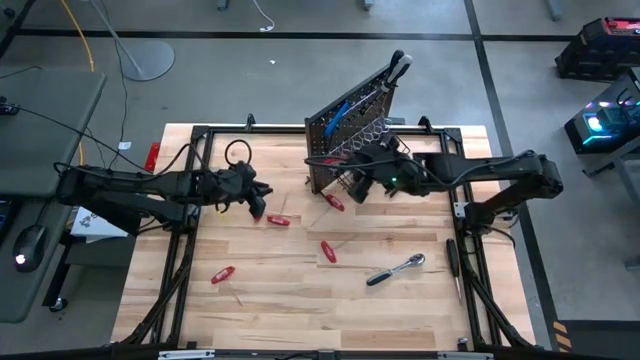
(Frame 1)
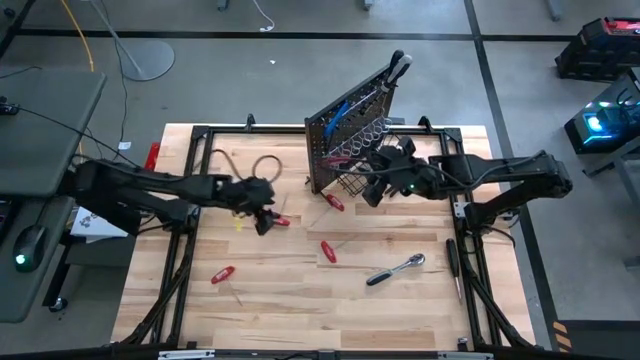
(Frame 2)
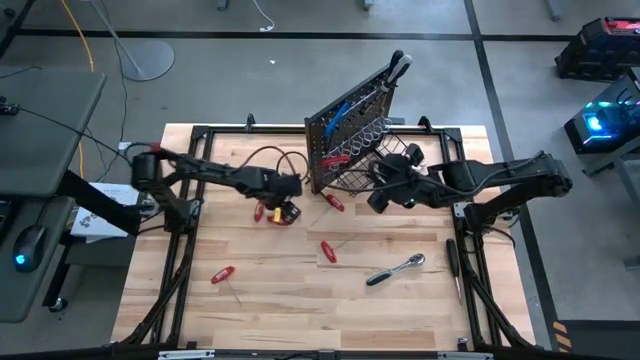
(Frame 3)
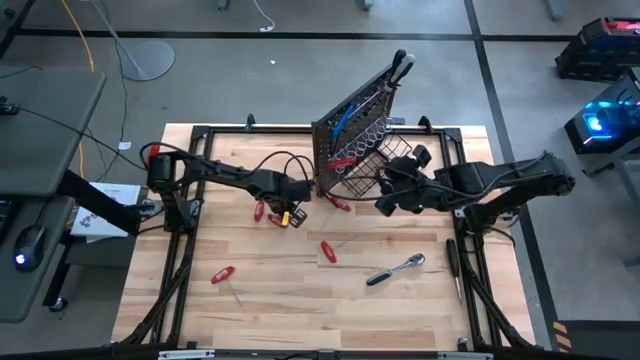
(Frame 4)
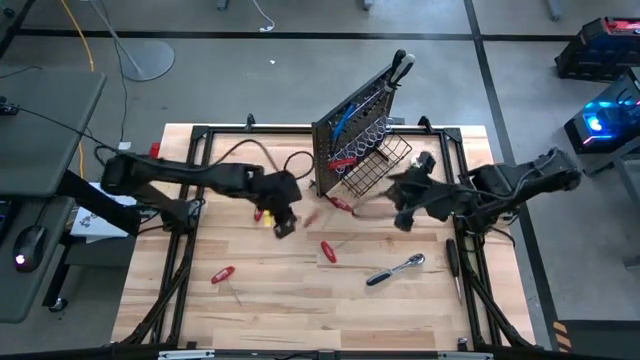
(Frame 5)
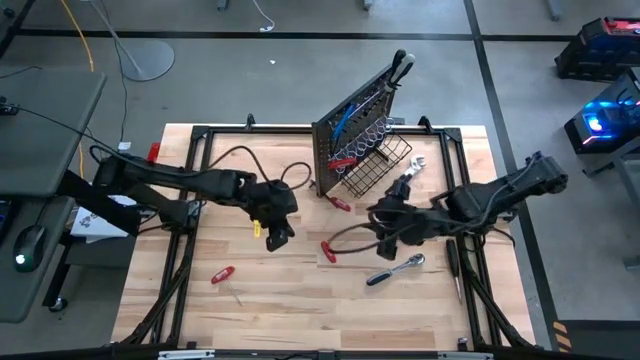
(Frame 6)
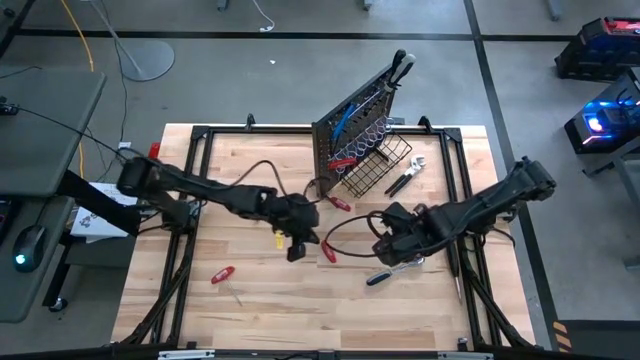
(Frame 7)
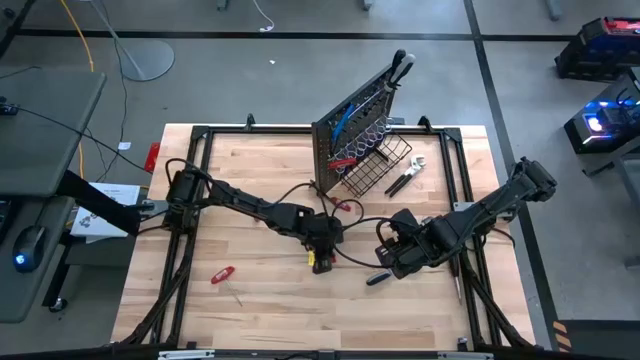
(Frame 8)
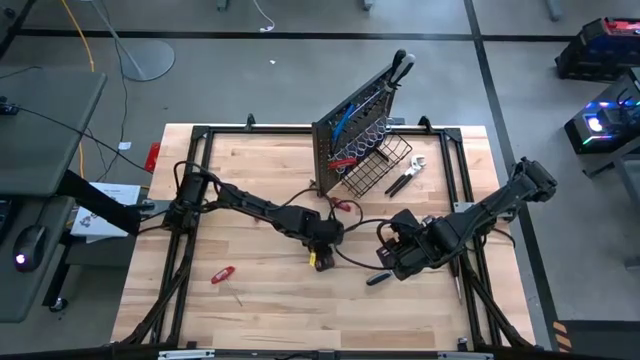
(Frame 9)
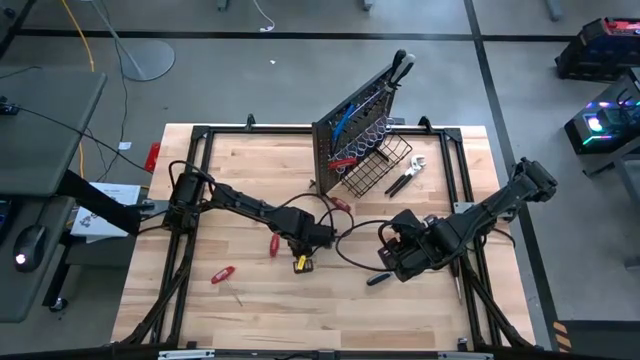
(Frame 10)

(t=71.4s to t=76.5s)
Task: Hang tools onto peg board
Hang the red allen wrench on the peg board

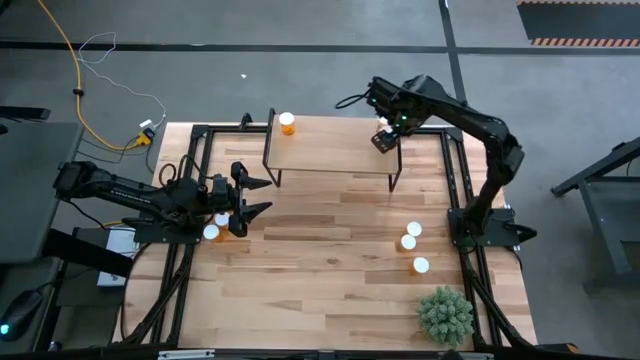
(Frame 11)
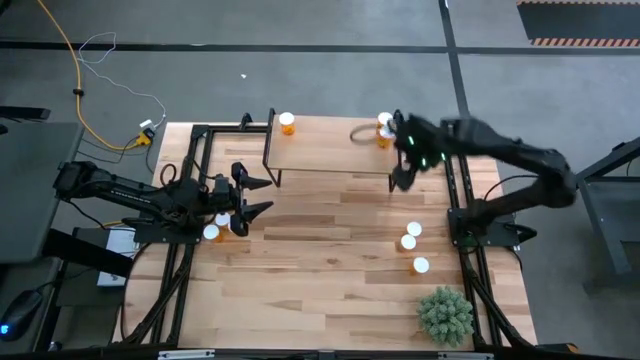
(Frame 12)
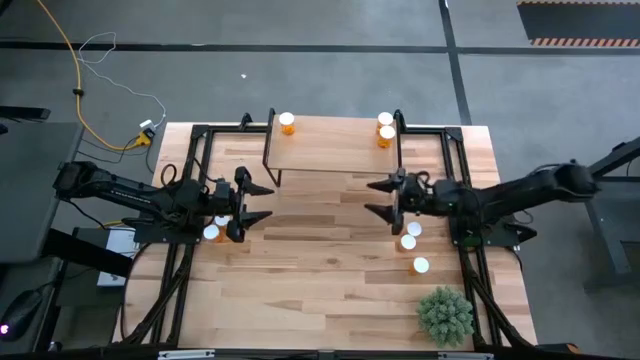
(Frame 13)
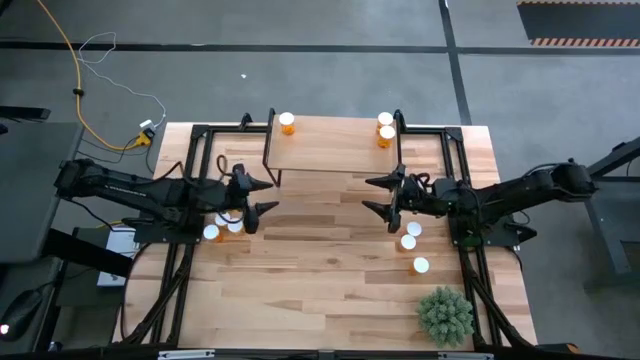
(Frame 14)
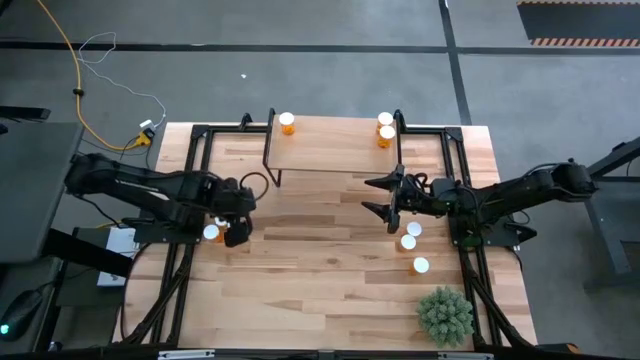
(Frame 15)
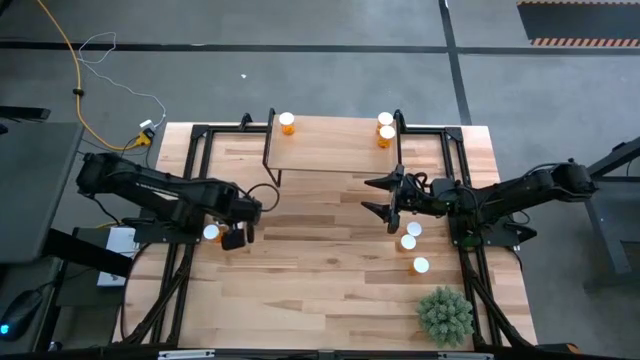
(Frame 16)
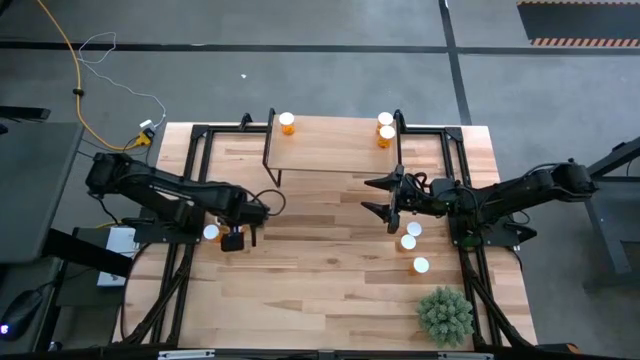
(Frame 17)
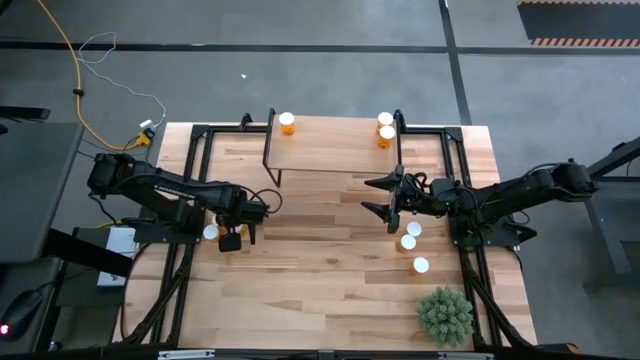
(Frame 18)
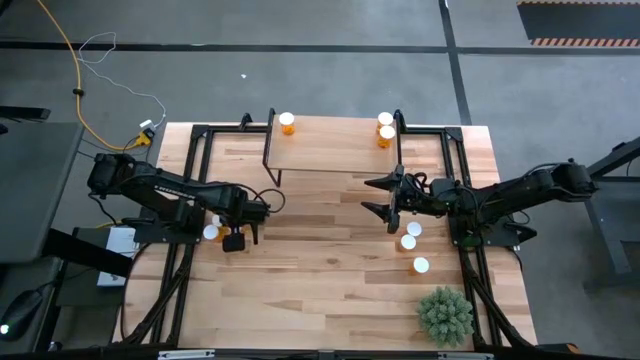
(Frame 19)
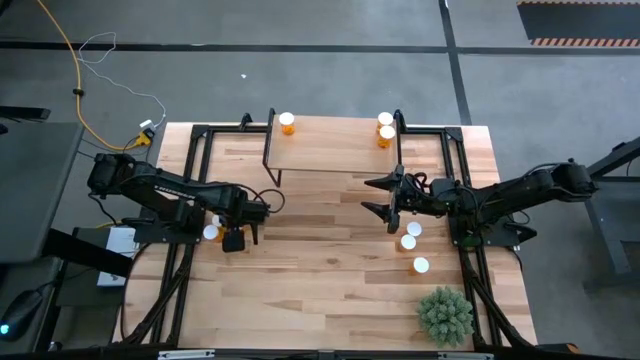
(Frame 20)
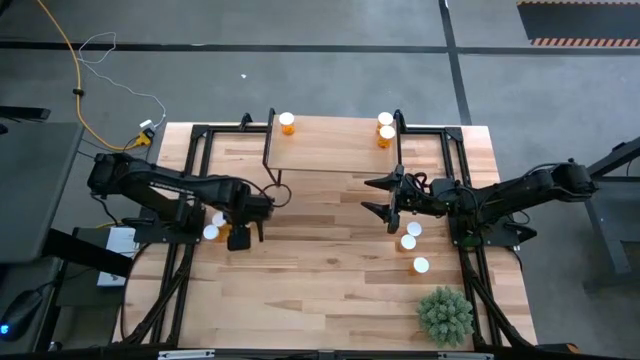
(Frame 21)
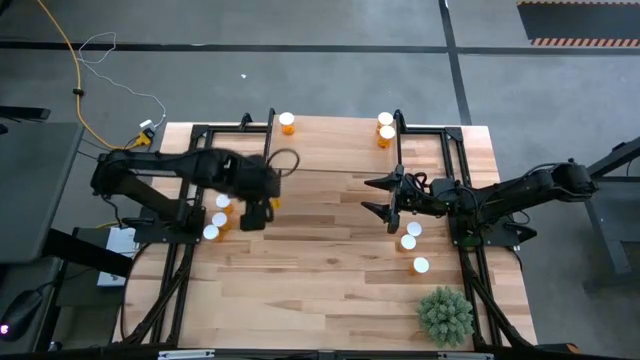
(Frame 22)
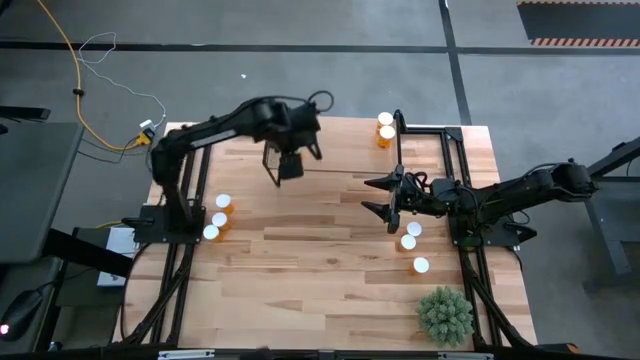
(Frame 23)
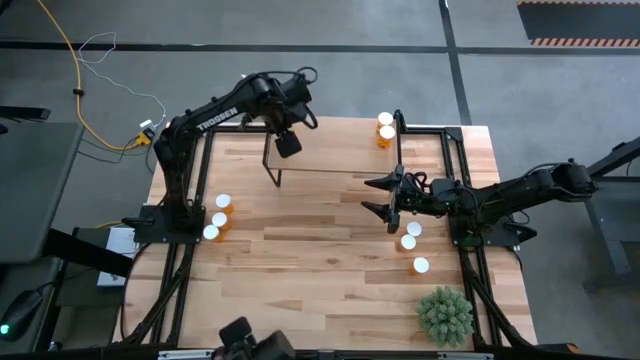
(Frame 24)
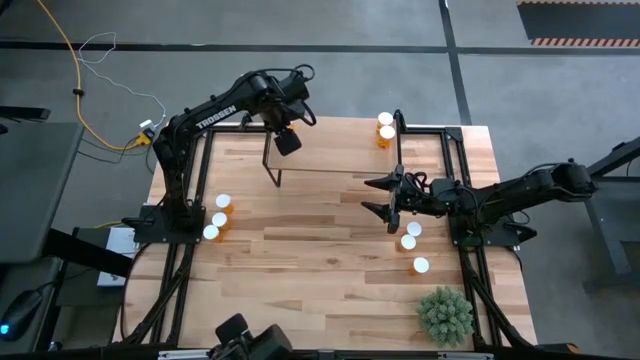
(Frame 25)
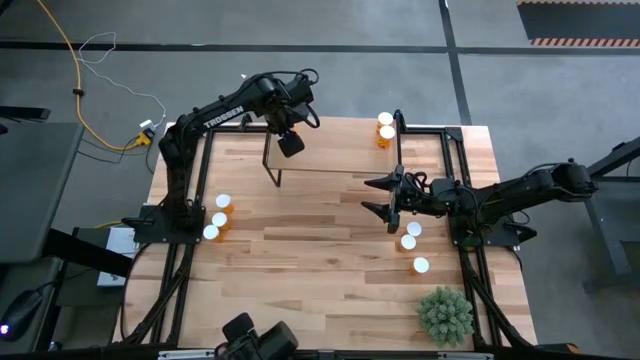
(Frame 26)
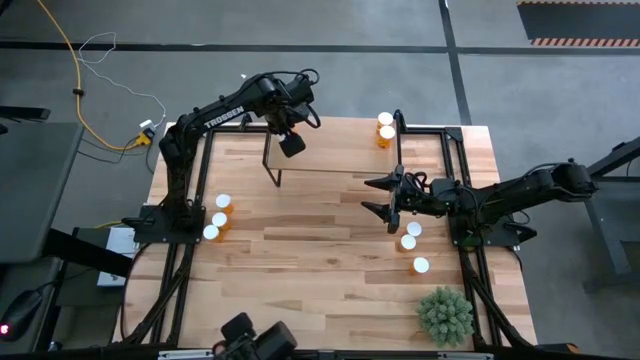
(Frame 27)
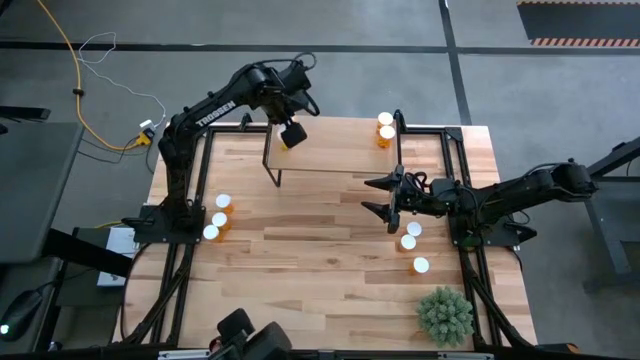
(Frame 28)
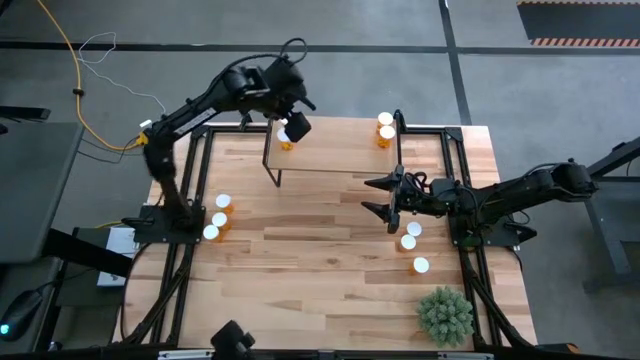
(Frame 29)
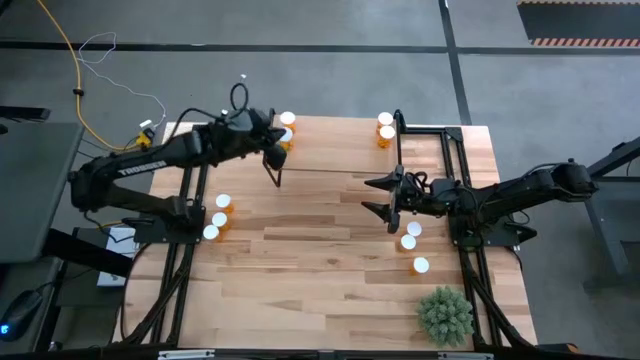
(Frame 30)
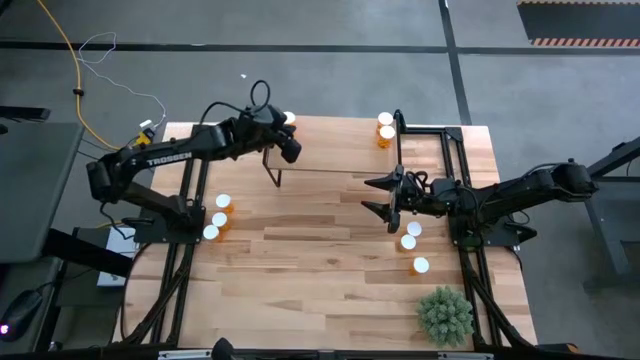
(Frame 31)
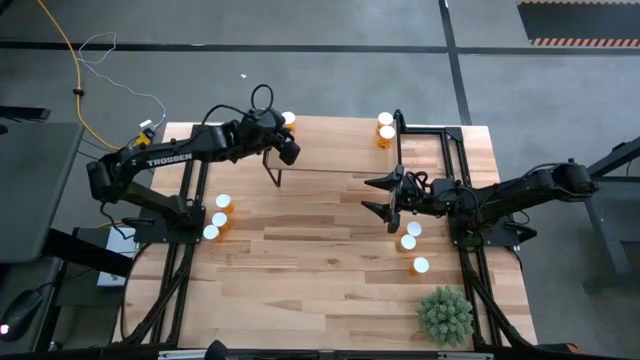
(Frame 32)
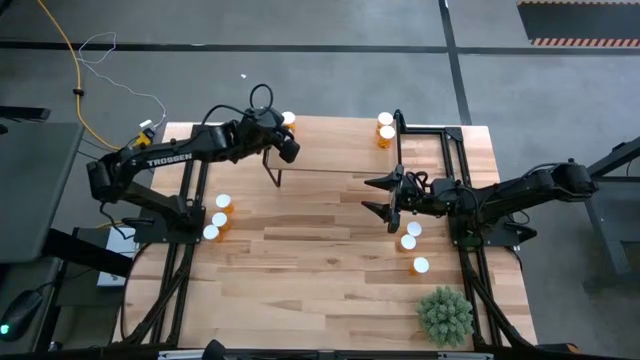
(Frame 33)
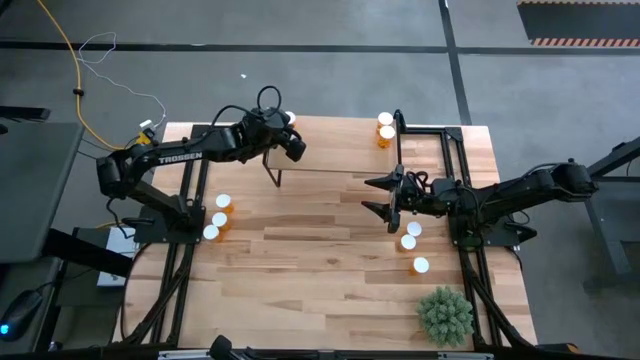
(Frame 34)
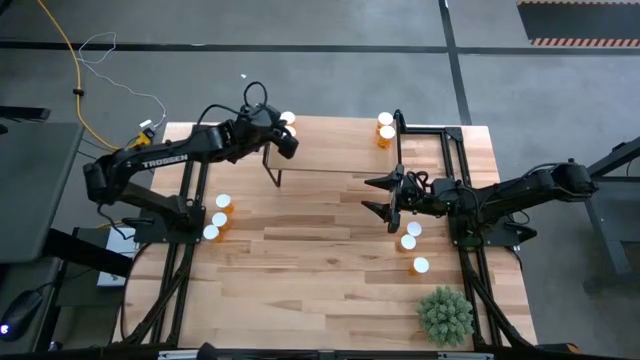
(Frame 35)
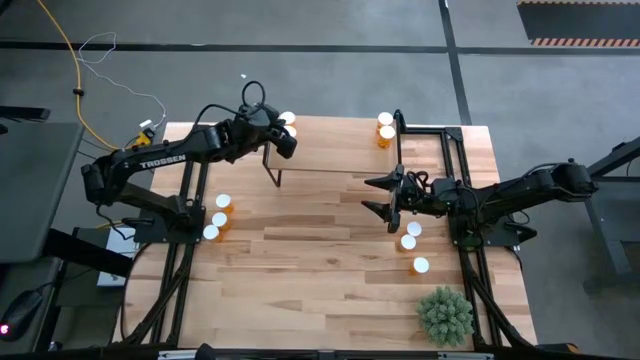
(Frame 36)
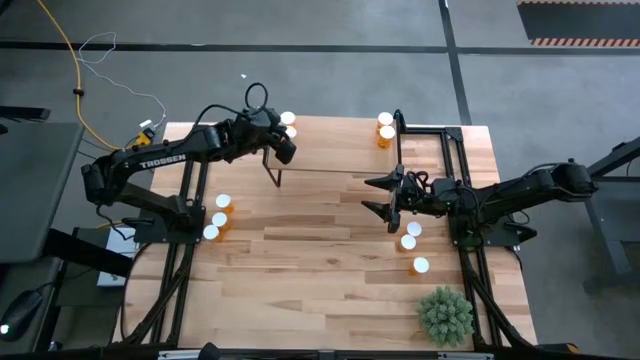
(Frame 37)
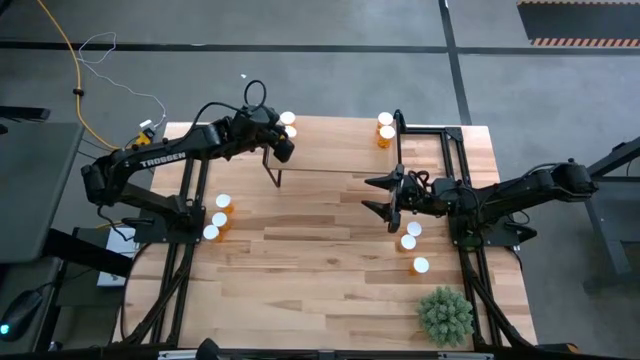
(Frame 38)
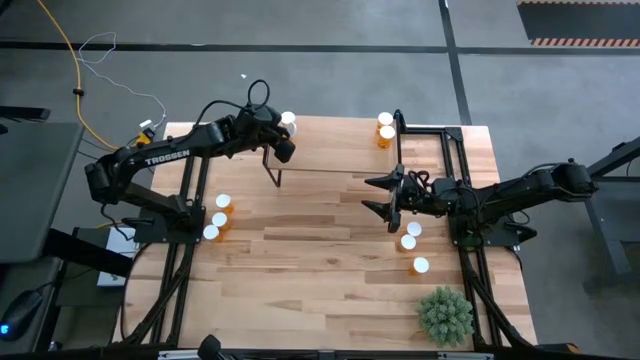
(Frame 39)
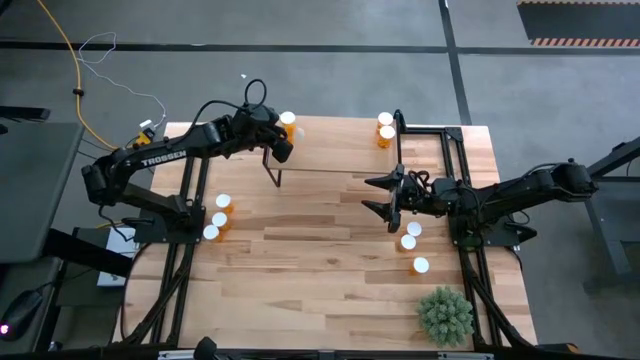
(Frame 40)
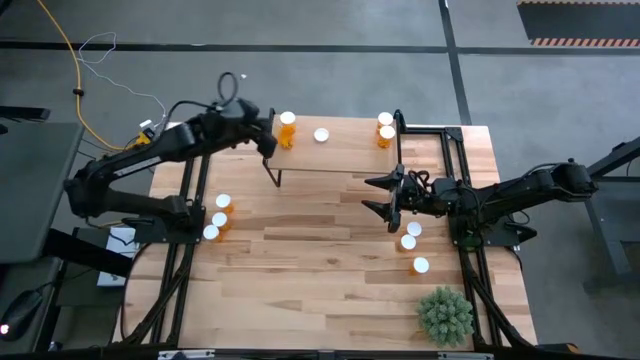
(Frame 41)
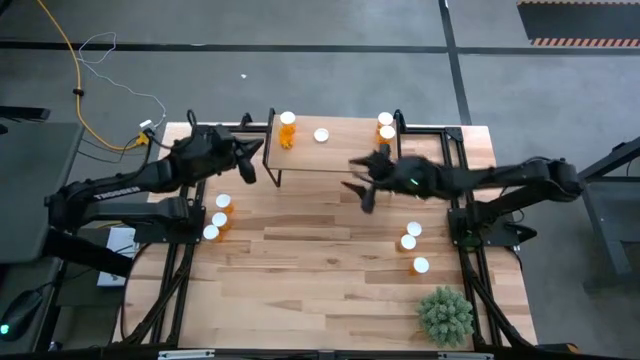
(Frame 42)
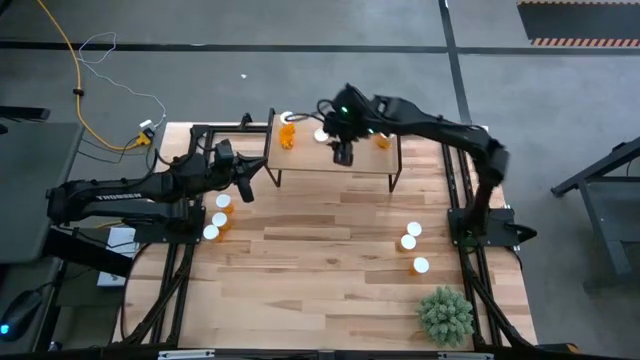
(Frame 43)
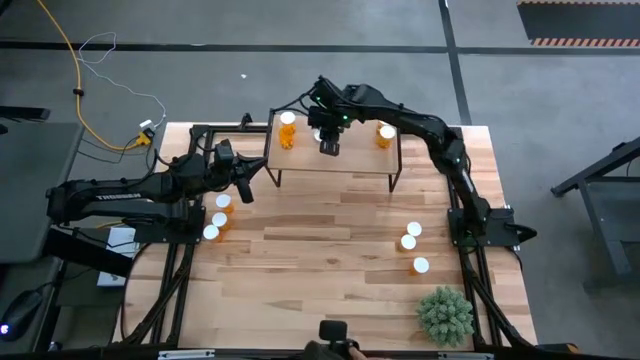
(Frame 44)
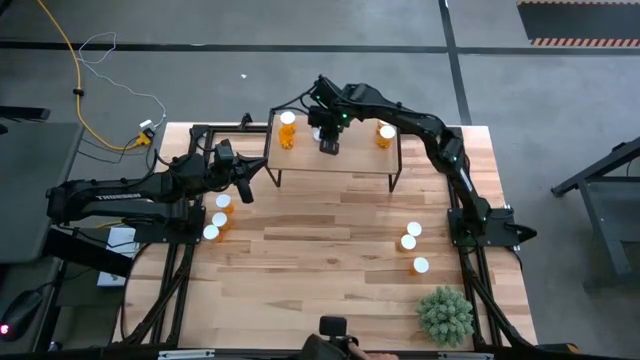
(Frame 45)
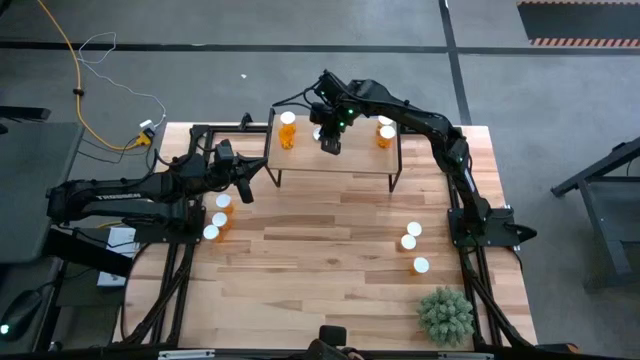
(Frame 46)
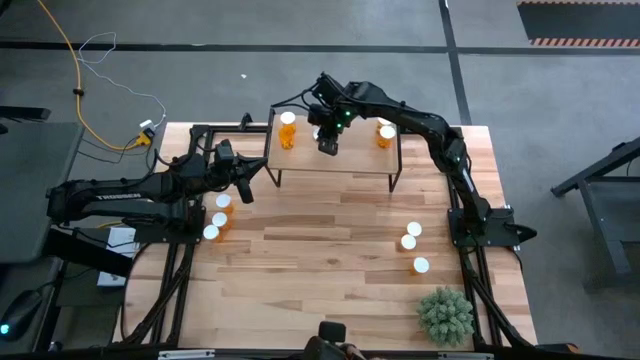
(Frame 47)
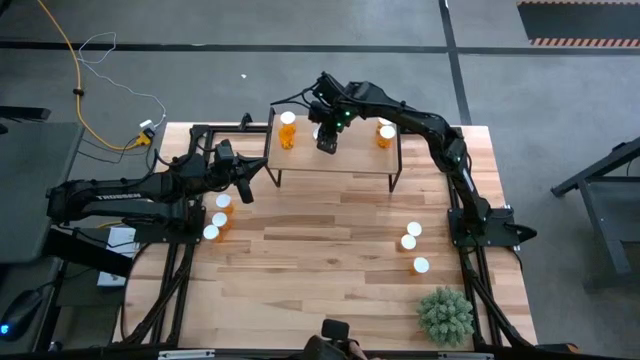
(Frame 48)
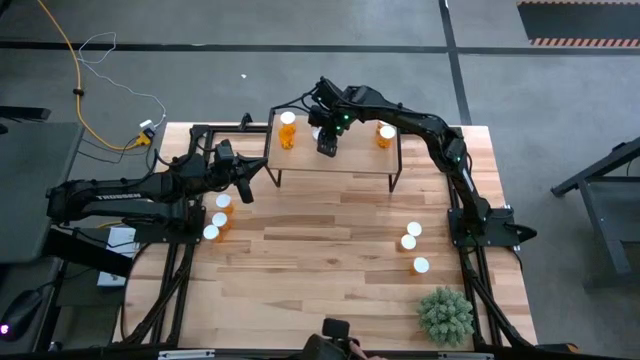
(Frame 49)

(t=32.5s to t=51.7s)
Task: Pick and place medicine bottles onto shelf by color
Put the yellow pill bottle on the shelf
